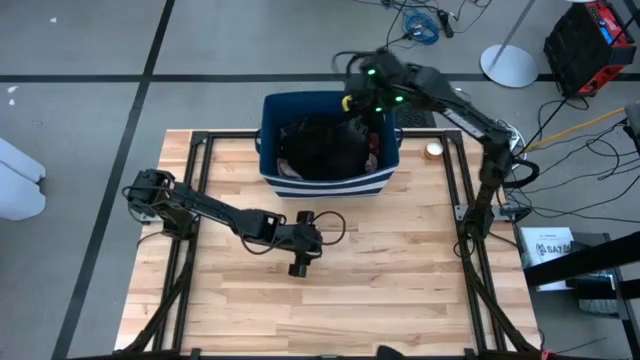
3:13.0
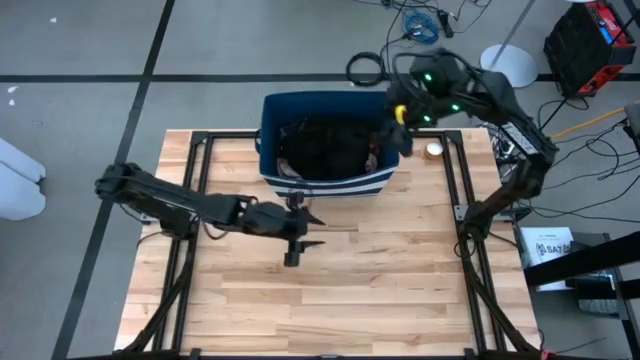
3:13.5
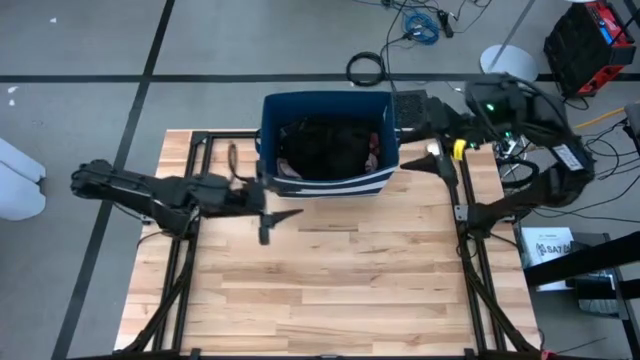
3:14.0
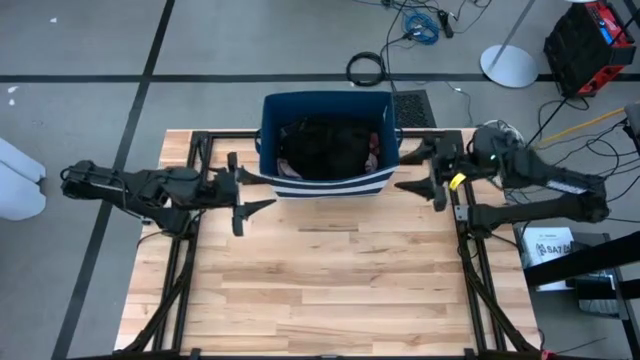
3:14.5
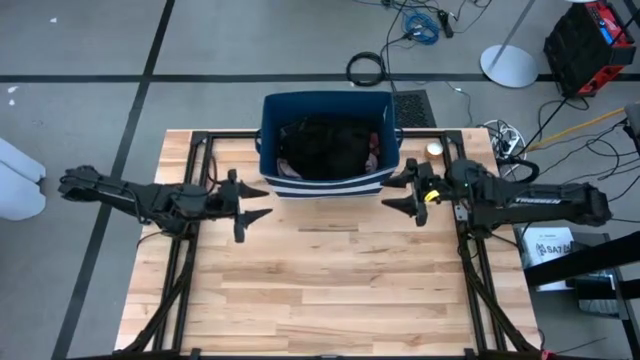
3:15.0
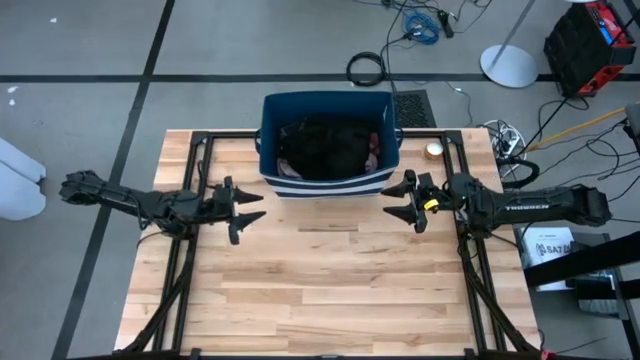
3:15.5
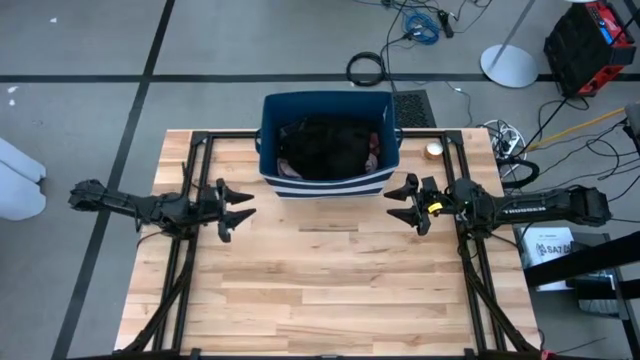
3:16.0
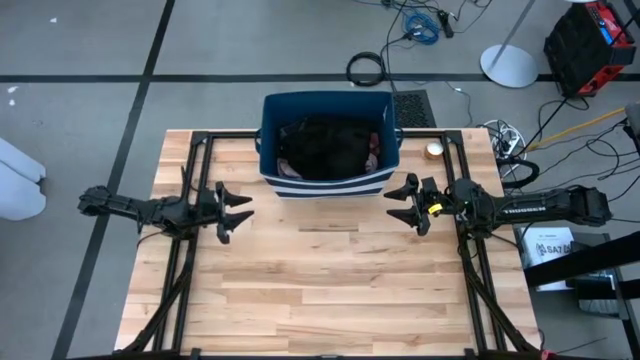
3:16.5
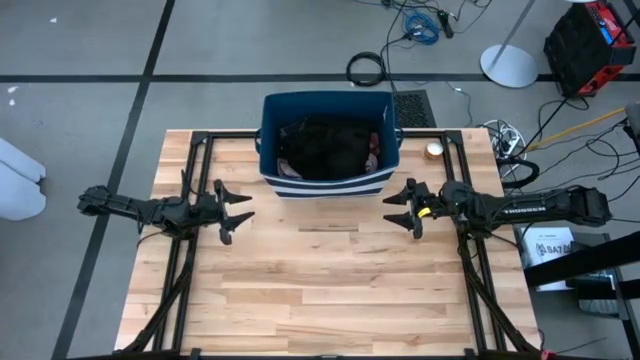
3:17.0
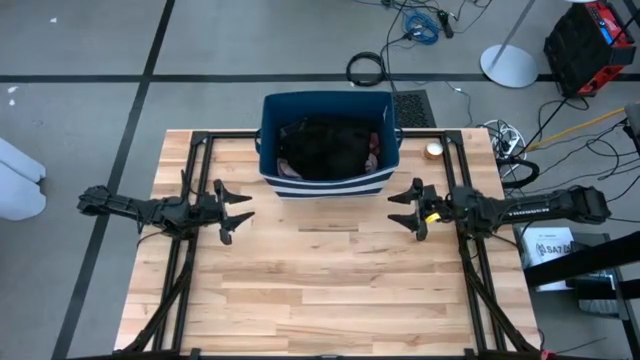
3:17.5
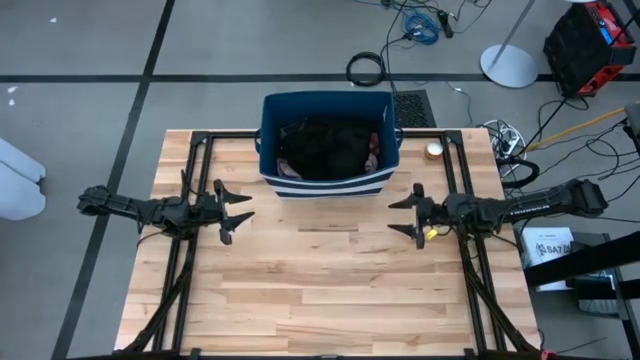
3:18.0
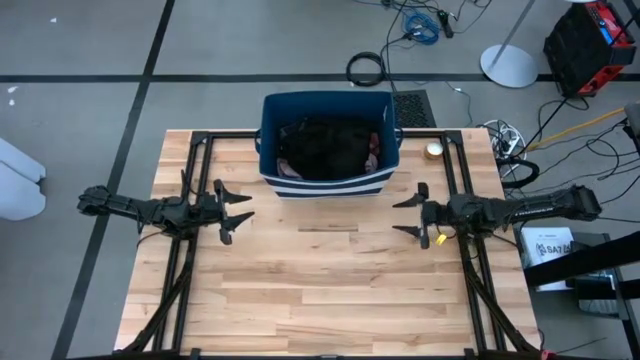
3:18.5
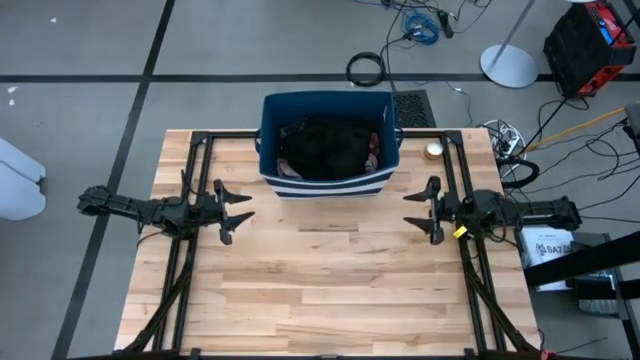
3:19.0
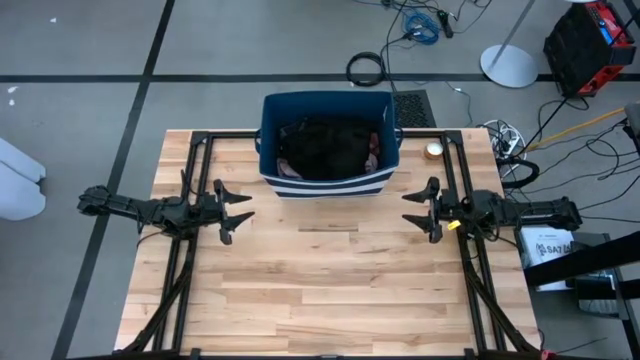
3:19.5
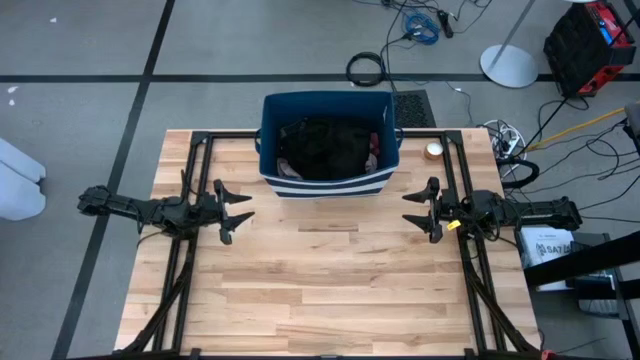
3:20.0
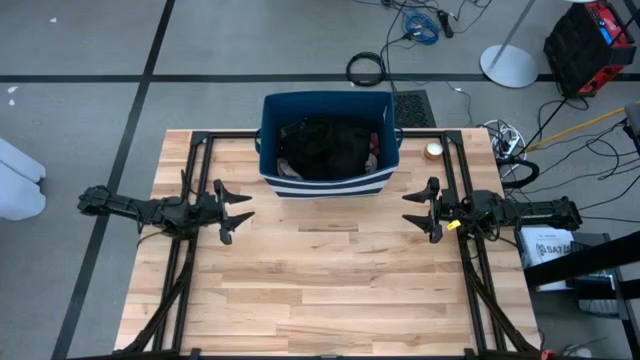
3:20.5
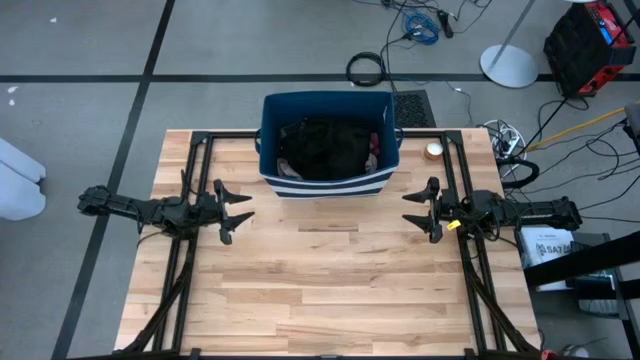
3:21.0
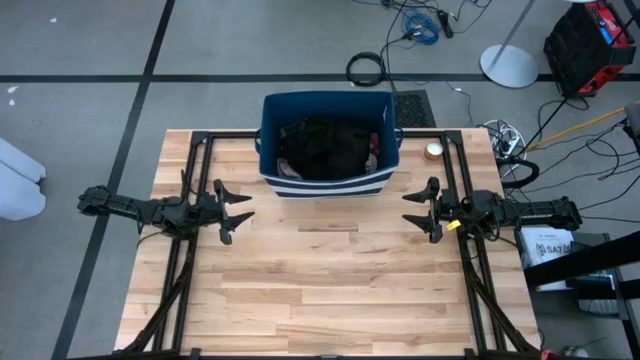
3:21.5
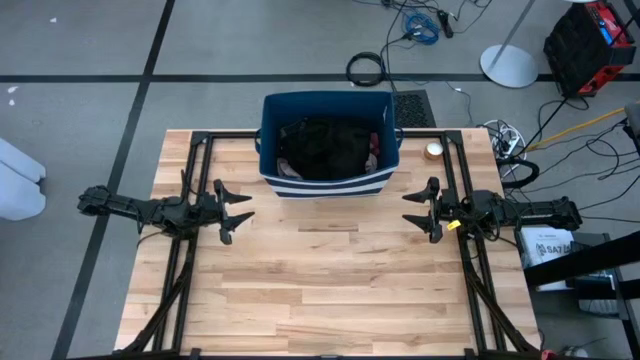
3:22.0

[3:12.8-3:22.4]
Task: Sort clothes
Return to Home Position

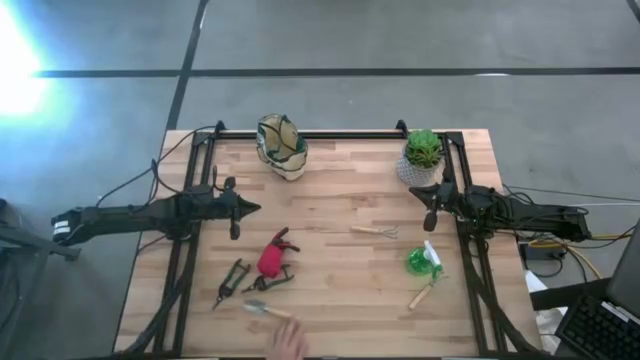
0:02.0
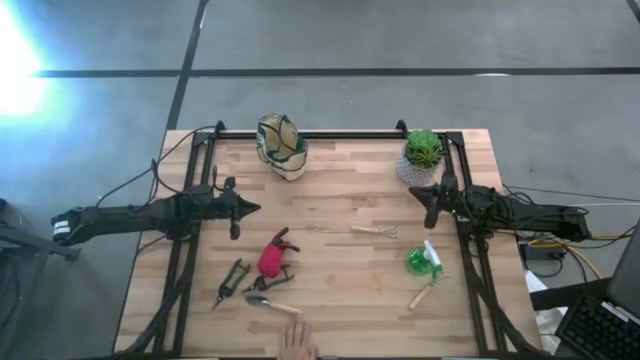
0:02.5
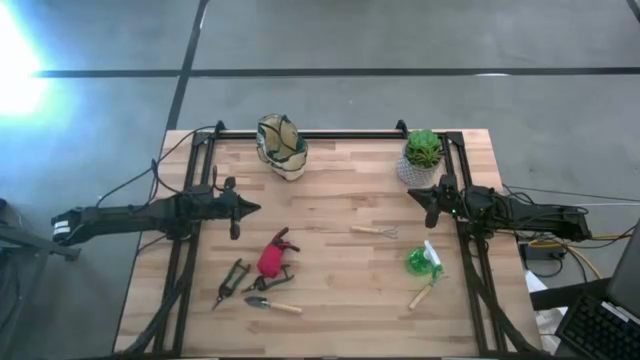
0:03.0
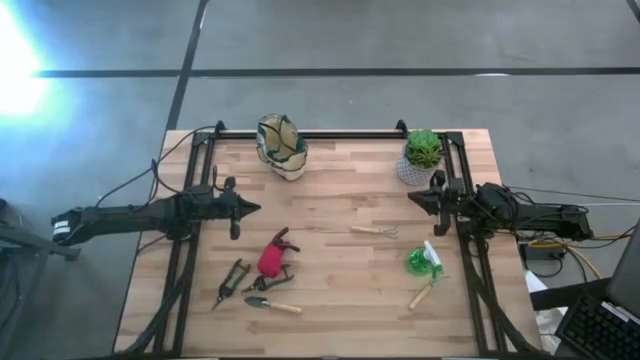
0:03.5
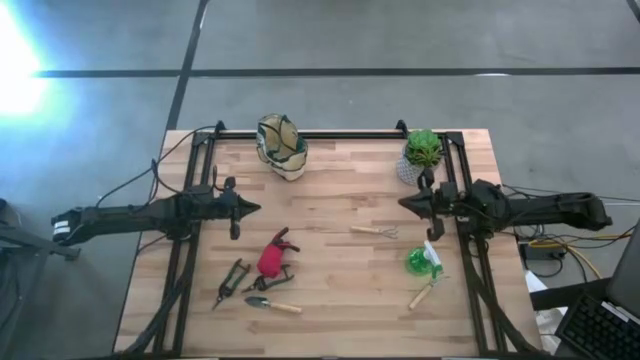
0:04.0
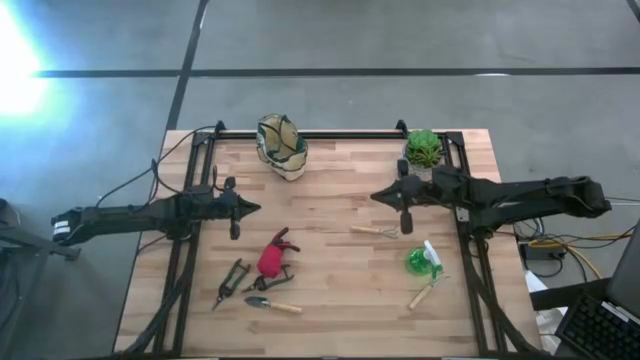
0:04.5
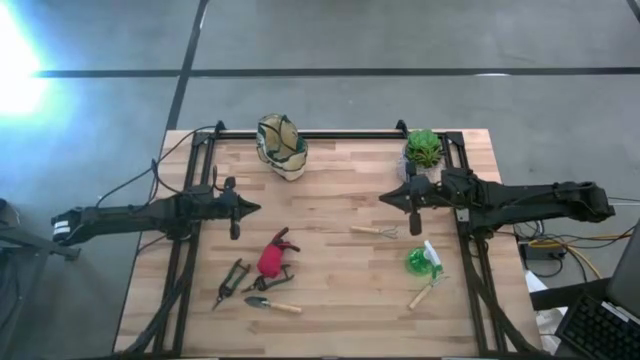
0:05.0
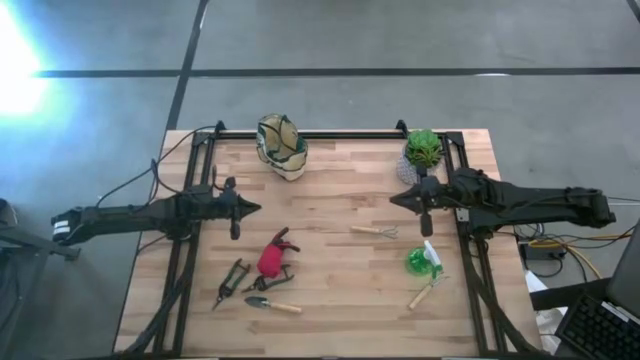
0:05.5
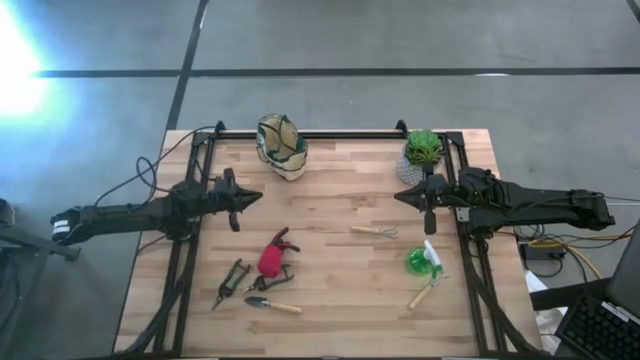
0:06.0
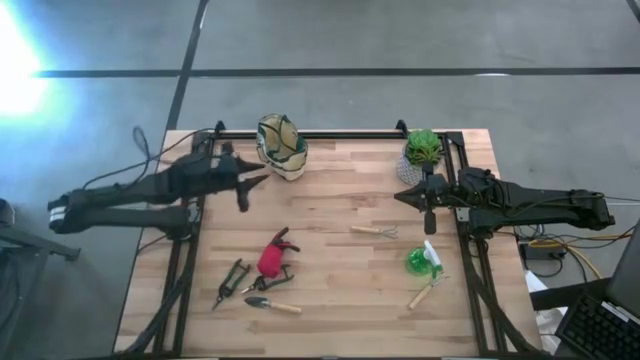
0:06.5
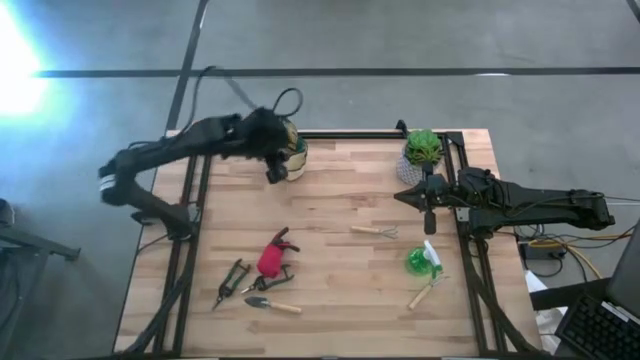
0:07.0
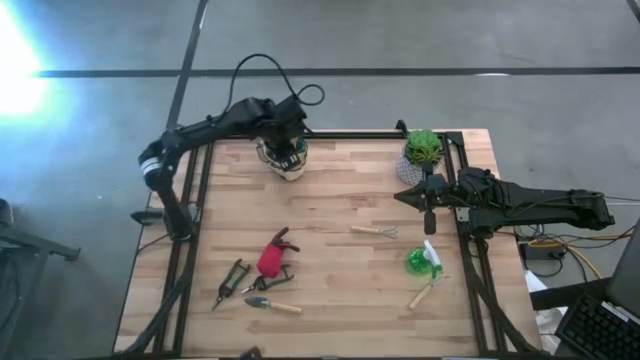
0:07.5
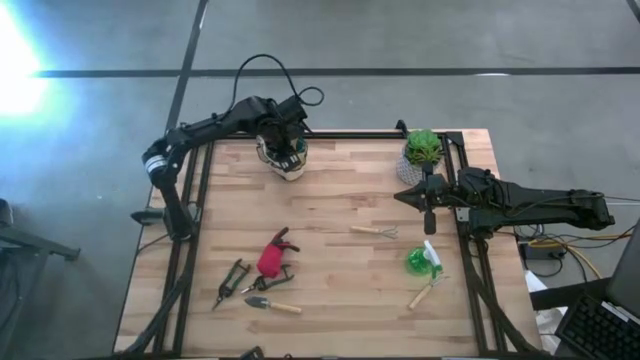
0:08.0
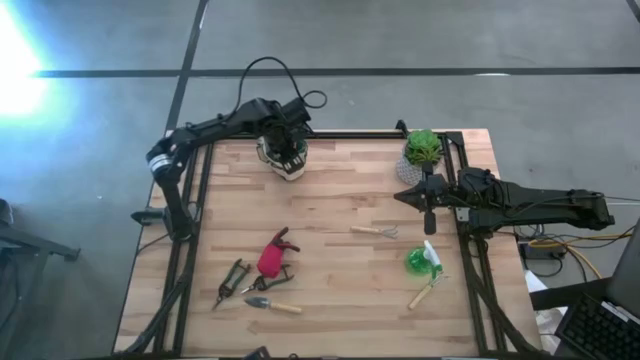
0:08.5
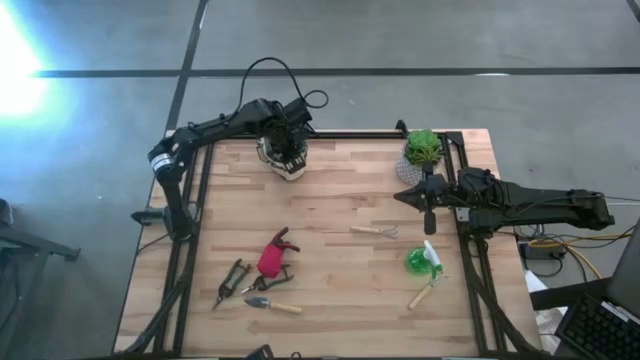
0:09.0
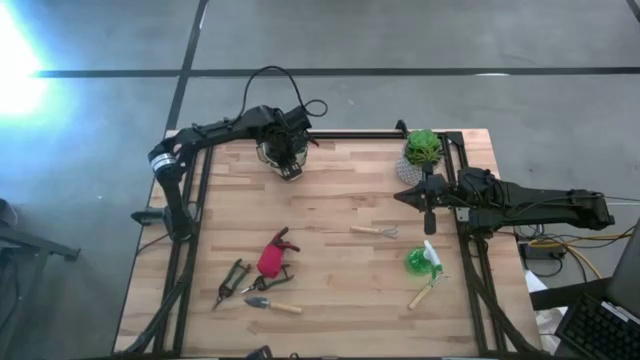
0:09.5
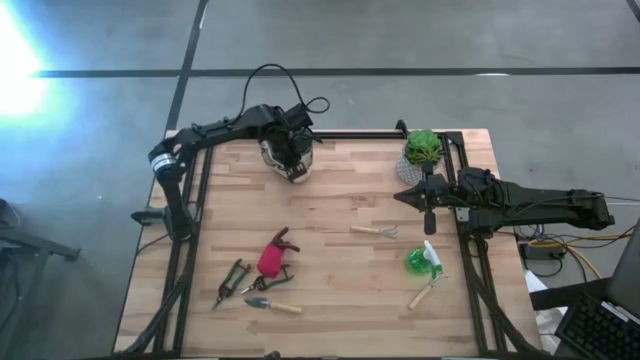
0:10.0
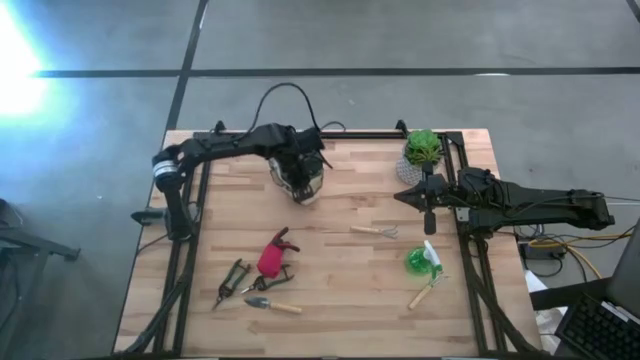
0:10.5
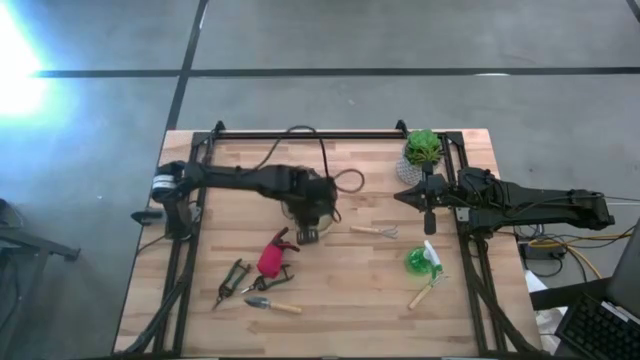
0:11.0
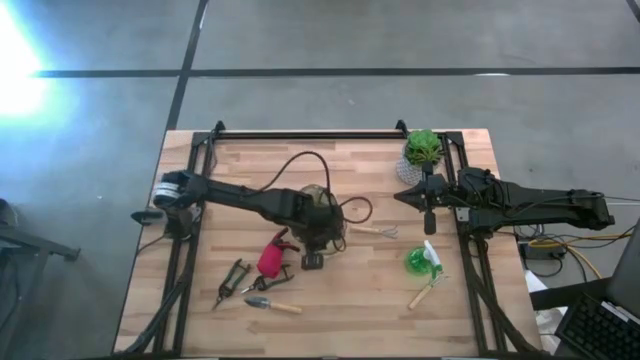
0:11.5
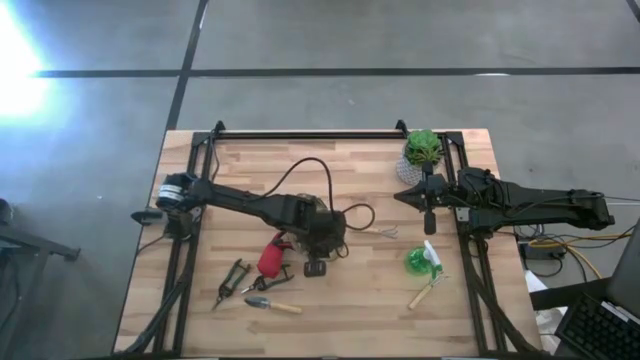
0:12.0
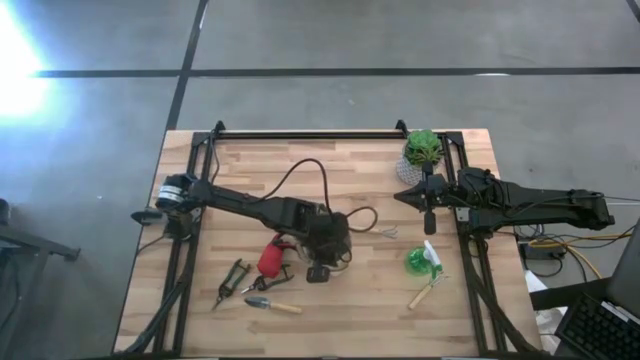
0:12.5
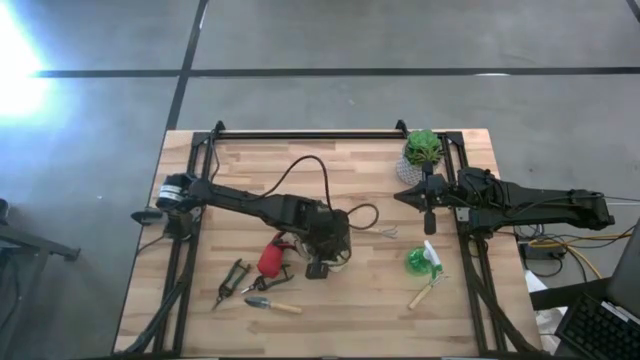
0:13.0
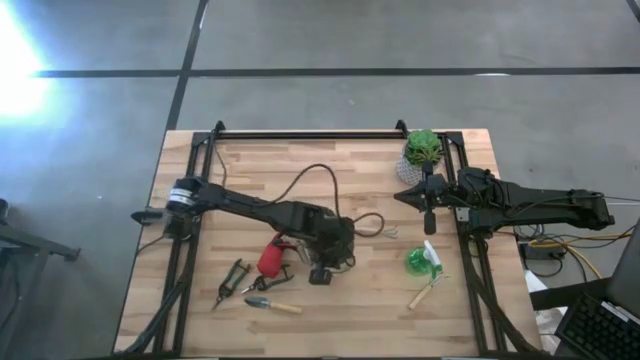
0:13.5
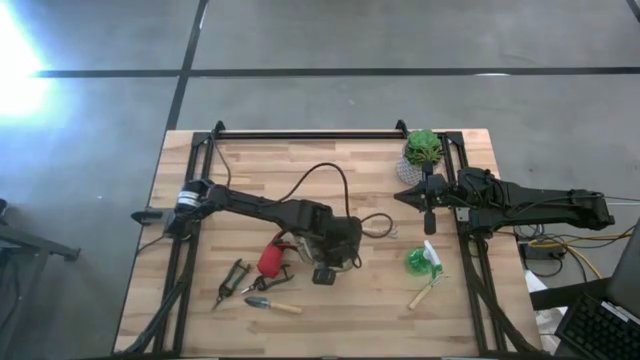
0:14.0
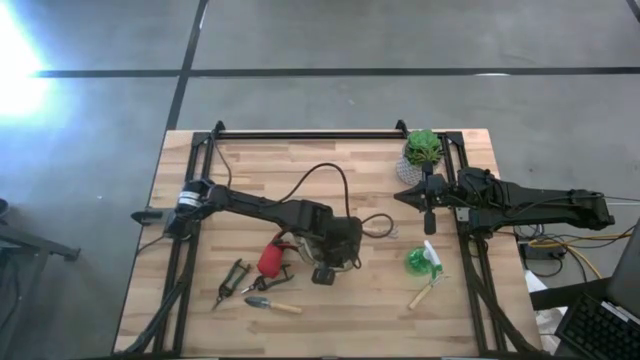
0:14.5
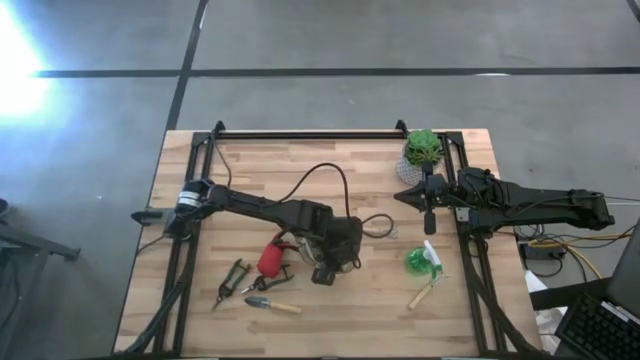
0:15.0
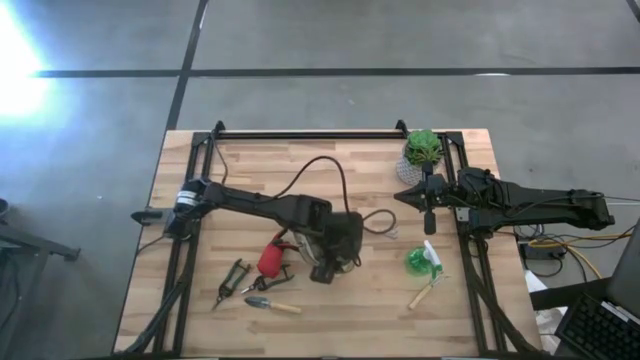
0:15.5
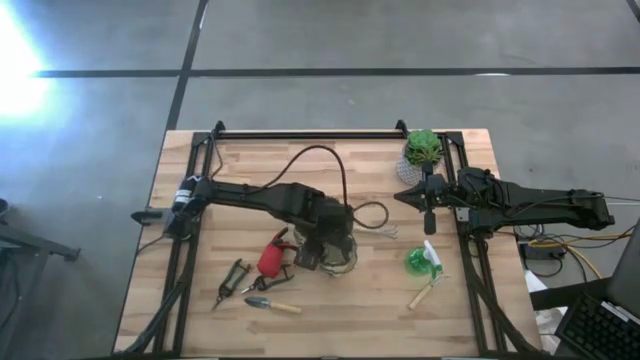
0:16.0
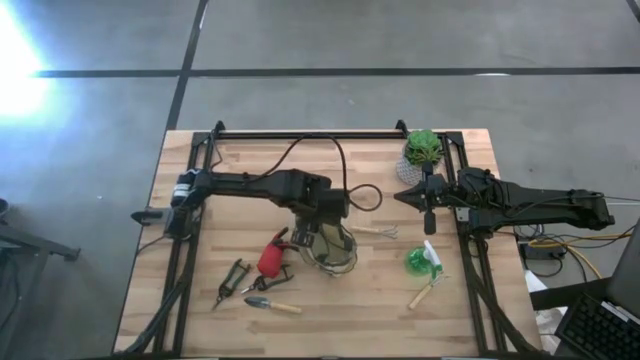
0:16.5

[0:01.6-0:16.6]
Task: Pick & Place Garden tools in Gardening bag
Prepare the light brown gardening bag on the table
